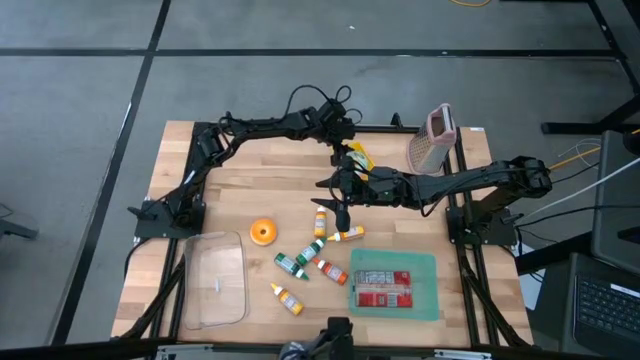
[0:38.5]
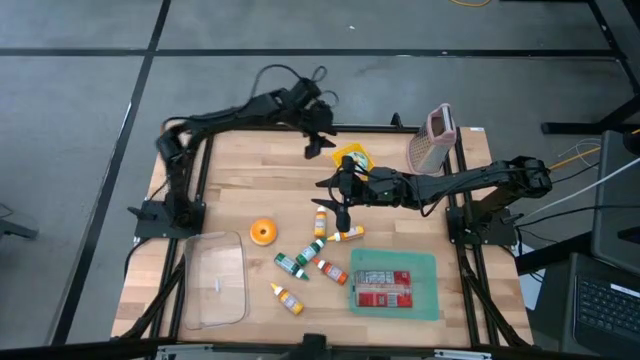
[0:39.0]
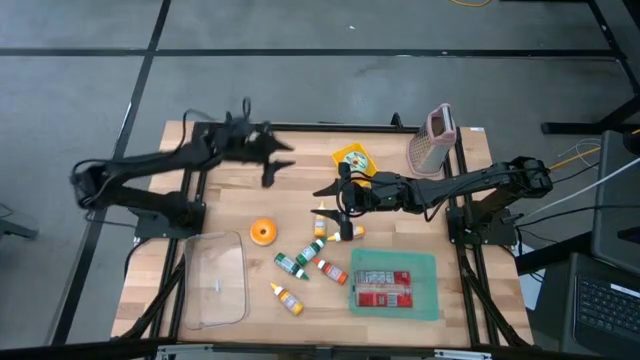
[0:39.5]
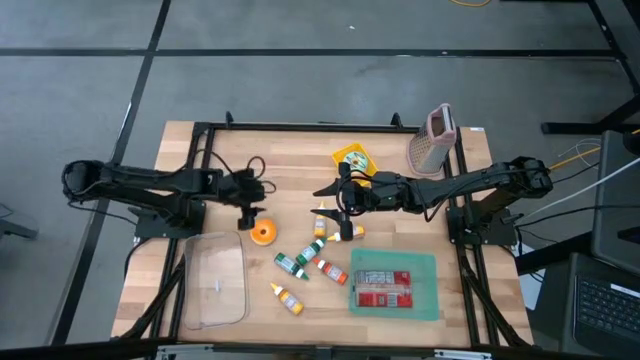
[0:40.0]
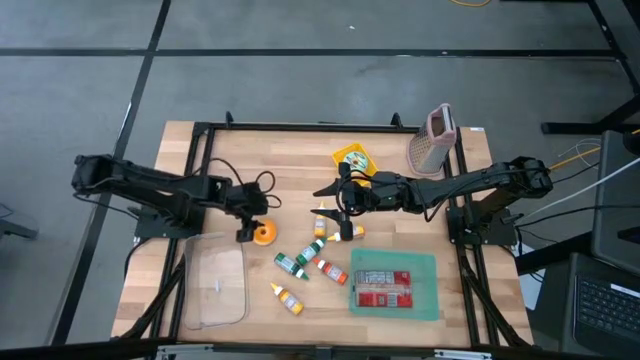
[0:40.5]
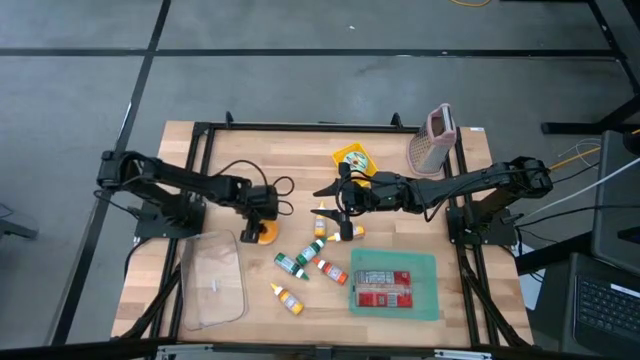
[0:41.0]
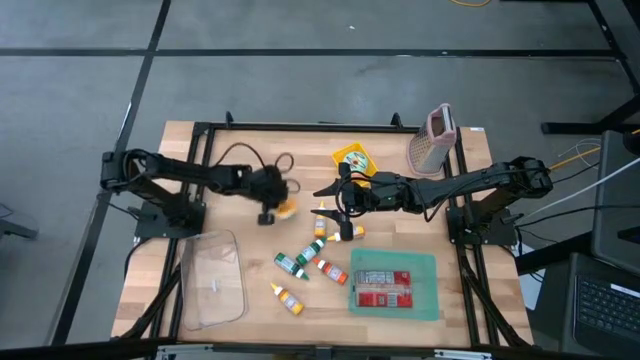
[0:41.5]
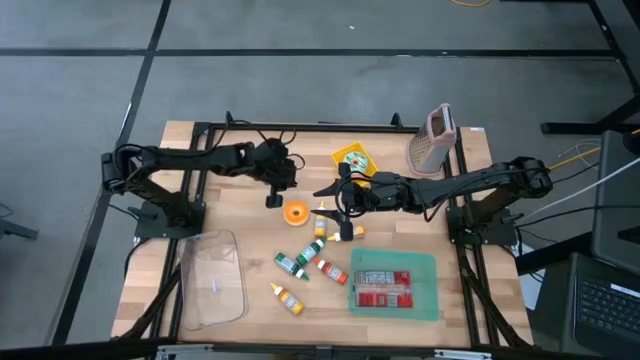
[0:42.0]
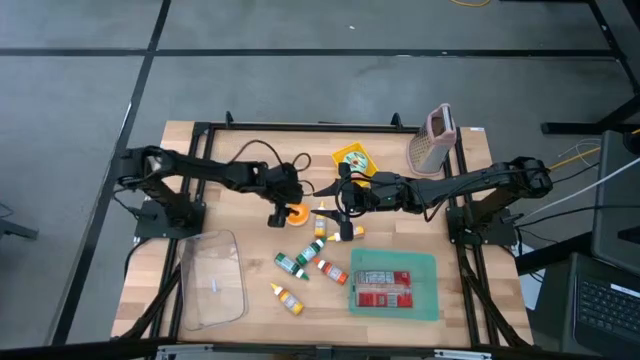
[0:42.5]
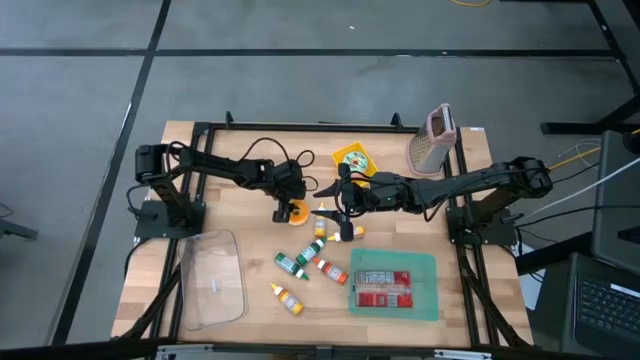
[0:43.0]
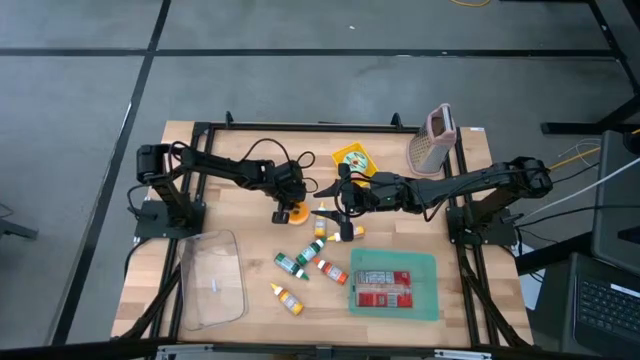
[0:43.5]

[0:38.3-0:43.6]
Stack the orange donut on top of the green donut in the yellow bin

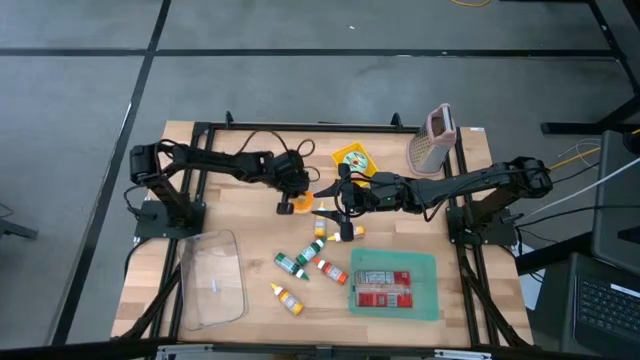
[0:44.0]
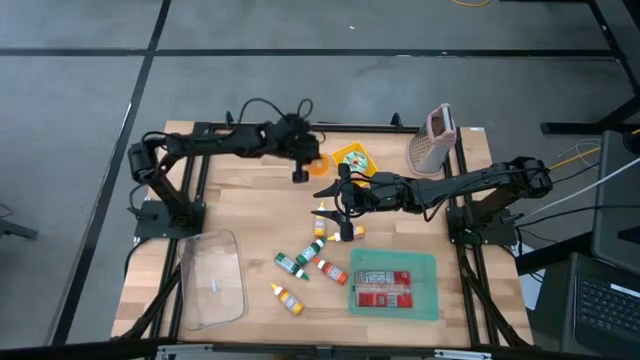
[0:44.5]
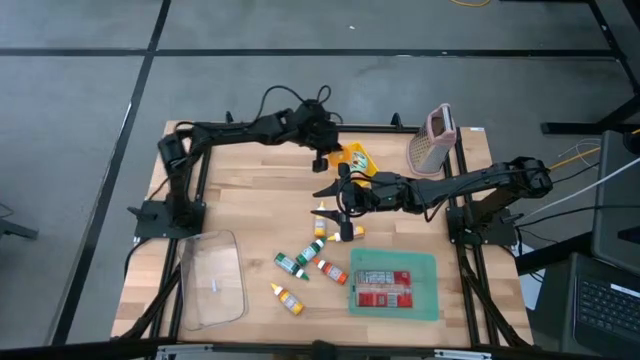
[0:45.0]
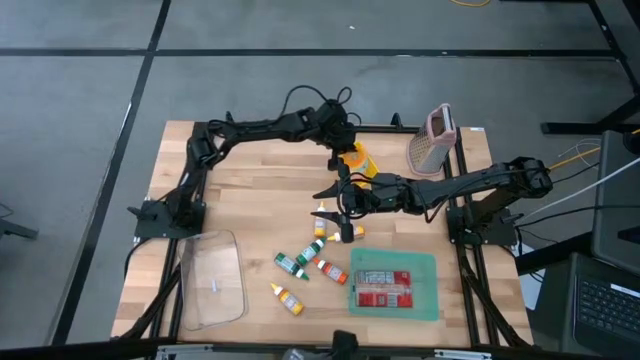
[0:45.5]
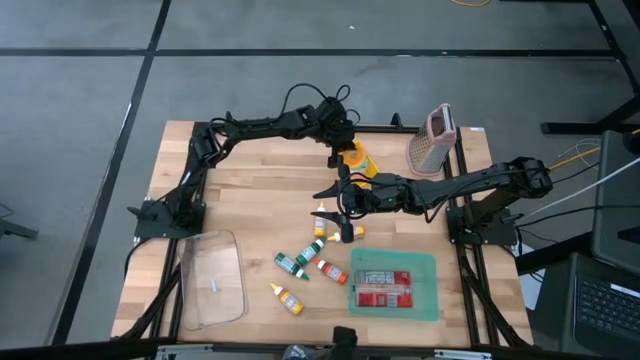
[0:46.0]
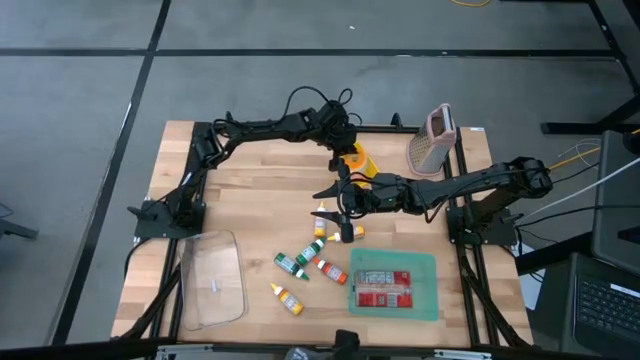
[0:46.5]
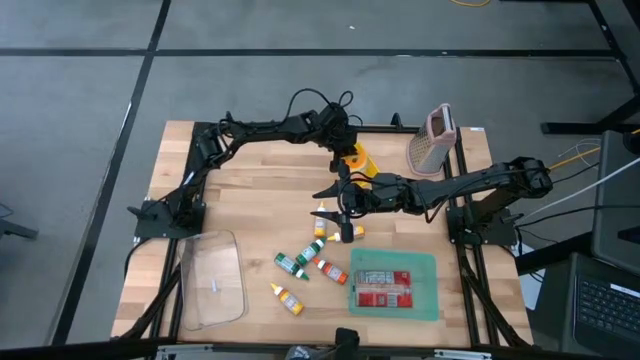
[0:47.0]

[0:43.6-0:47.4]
Stack the orange donut on top of the green donut in the yellow bin
